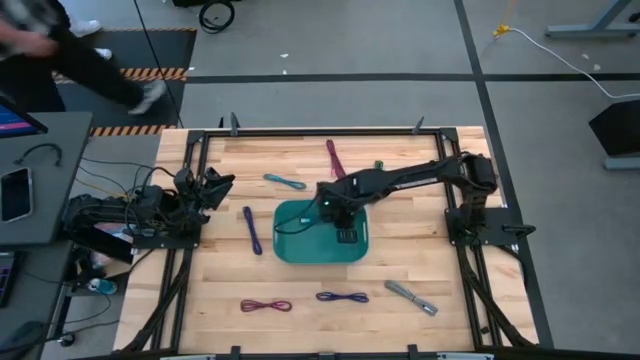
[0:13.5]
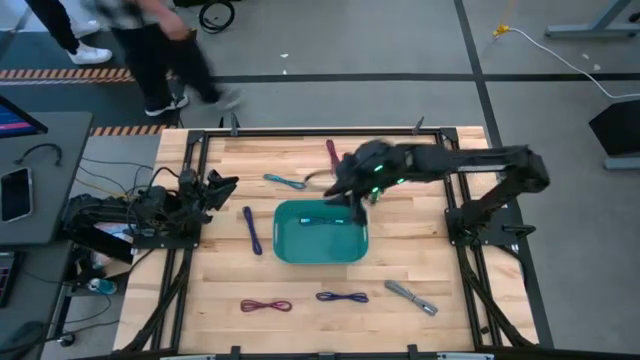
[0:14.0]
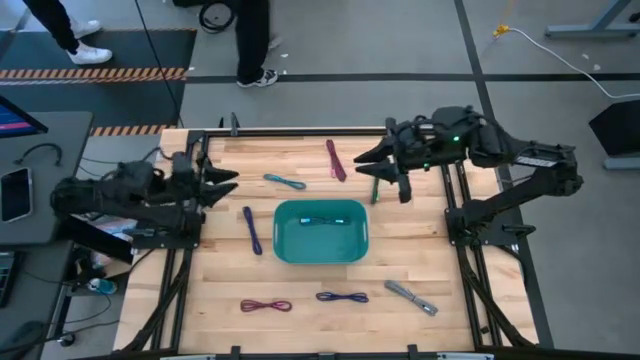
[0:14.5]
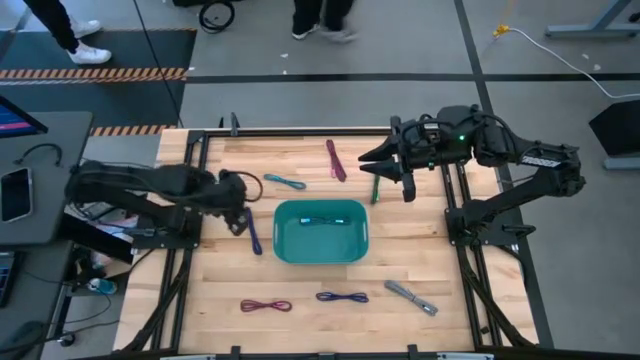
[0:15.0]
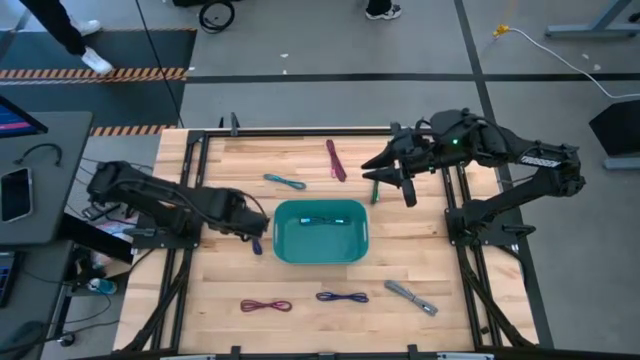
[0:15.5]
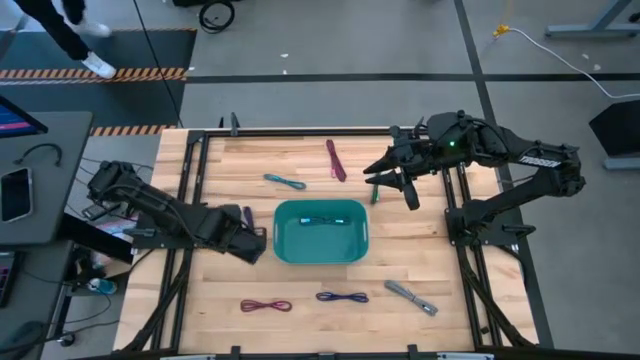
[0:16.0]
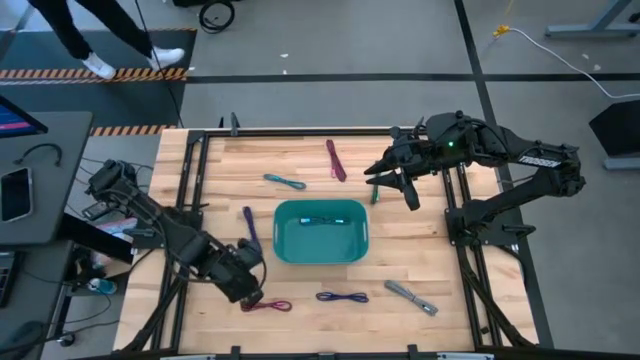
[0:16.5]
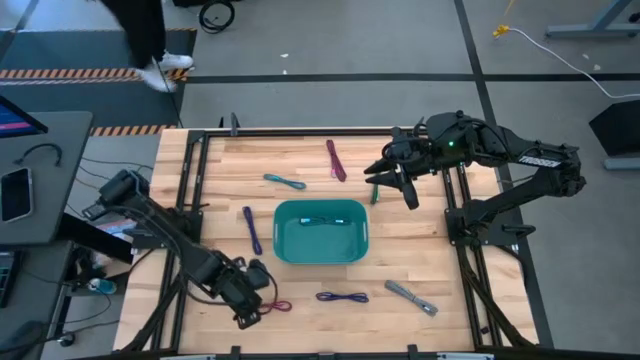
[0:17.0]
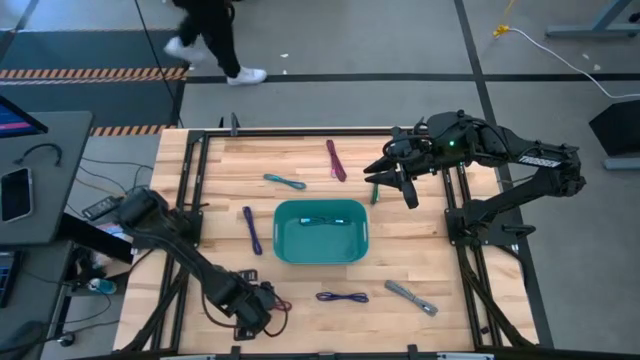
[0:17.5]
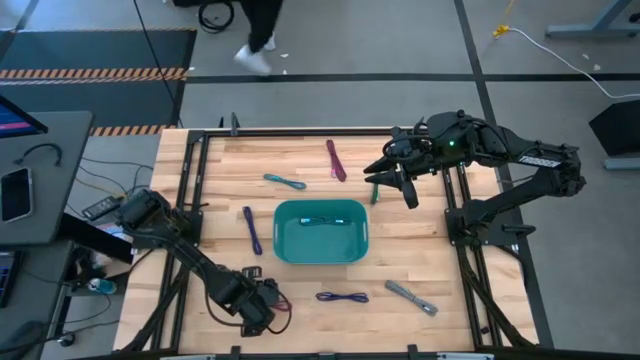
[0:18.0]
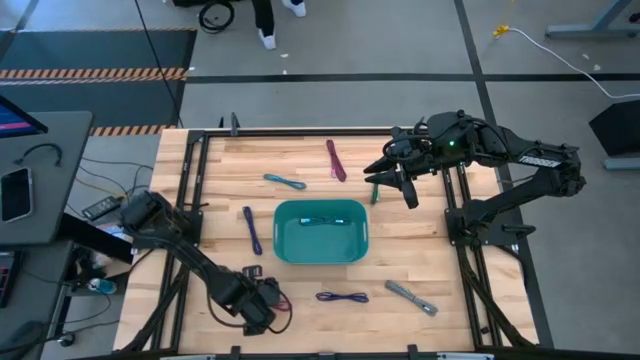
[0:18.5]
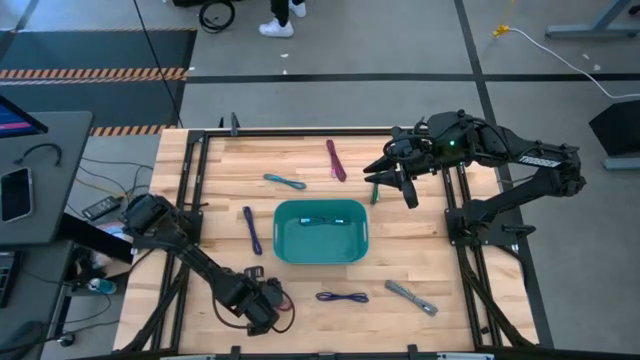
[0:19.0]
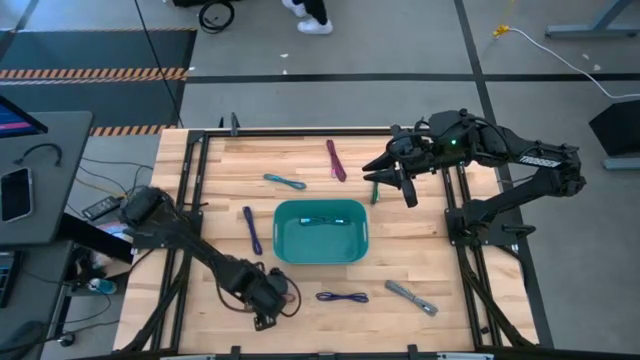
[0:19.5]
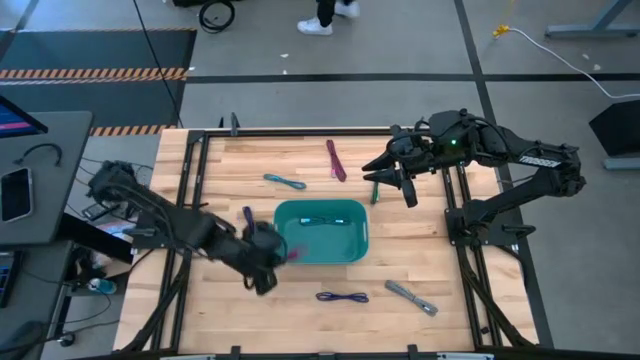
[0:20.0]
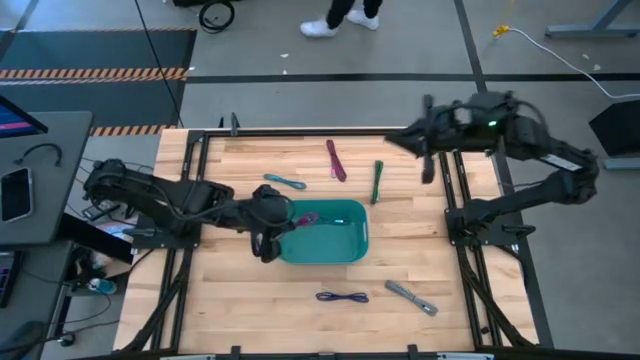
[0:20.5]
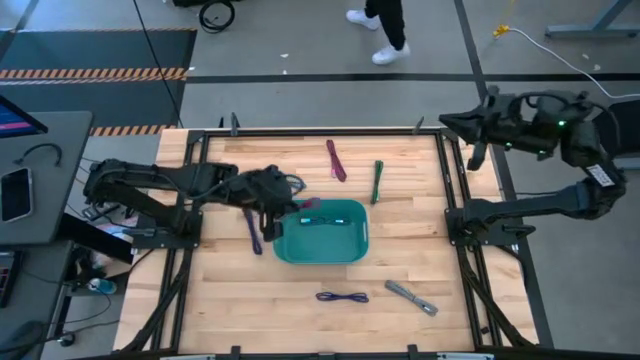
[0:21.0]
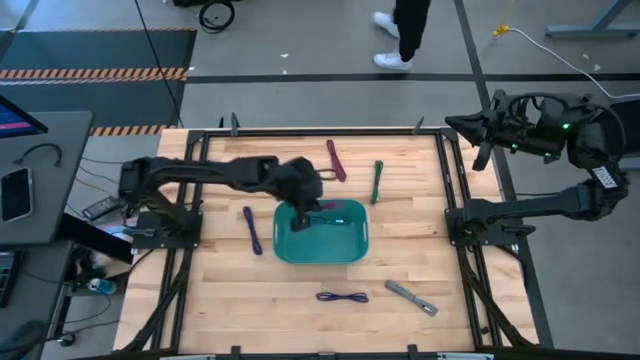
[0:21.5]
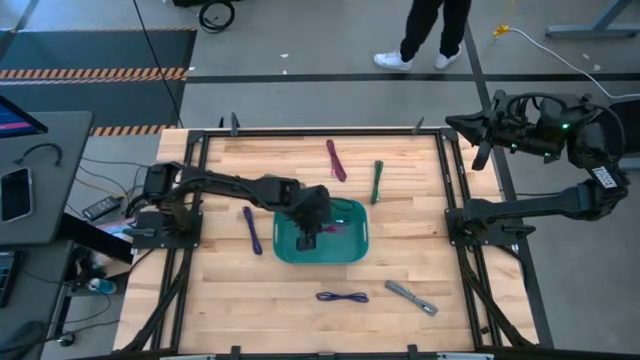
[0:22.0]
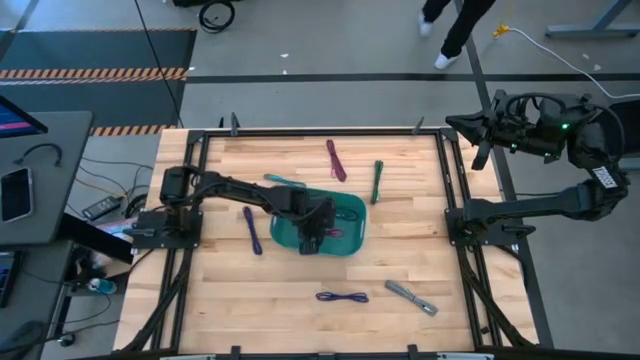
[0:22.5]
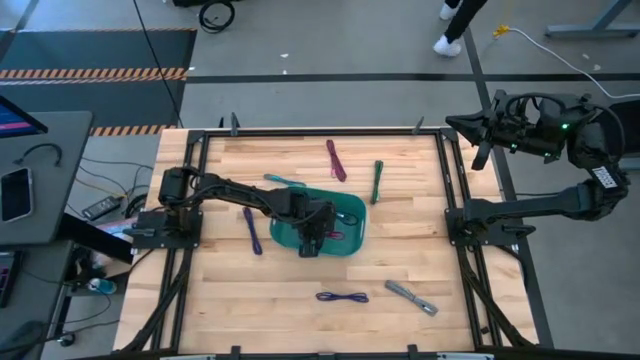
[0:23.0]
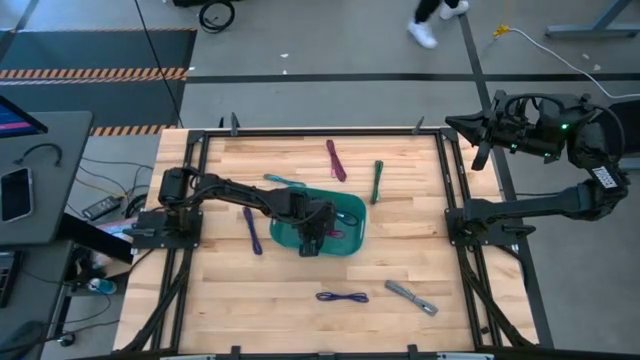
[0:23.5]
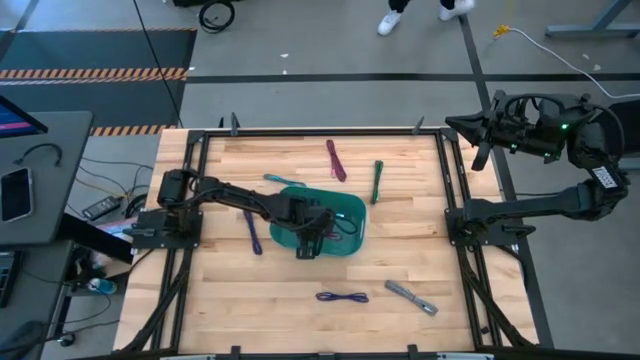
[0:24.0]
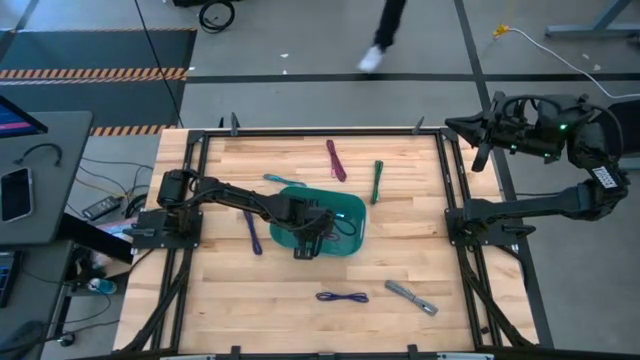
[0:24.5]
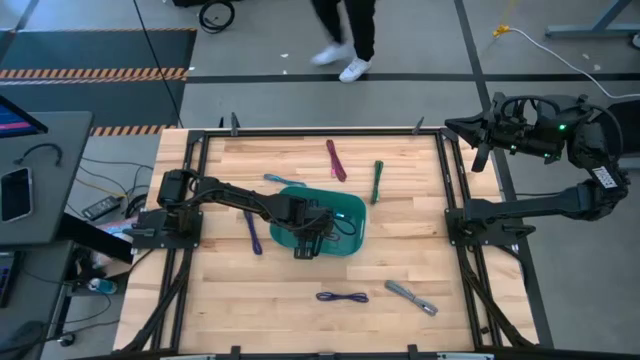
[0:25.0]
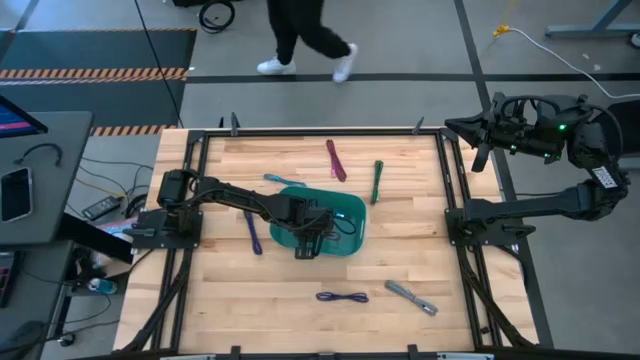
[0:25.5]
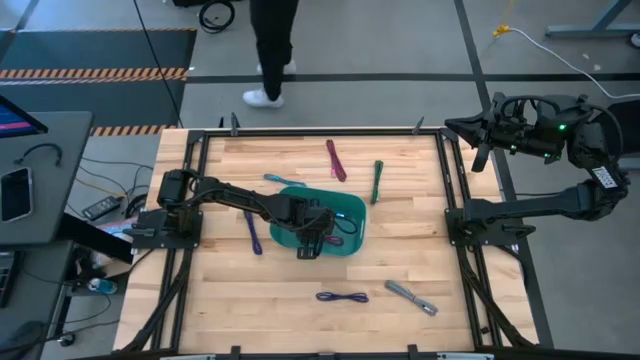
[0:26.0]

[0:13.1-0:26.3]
Task: Pick and place USB-C Cables
Put the bottom pink charger cable into the blue bin

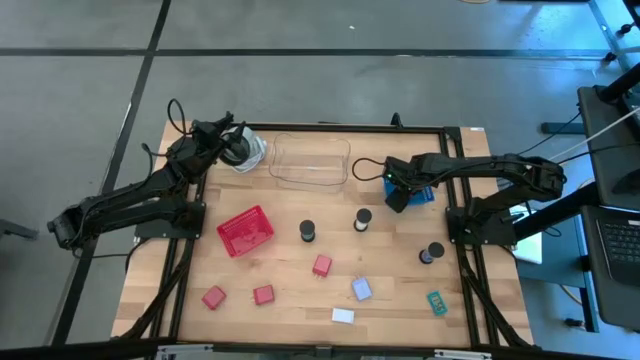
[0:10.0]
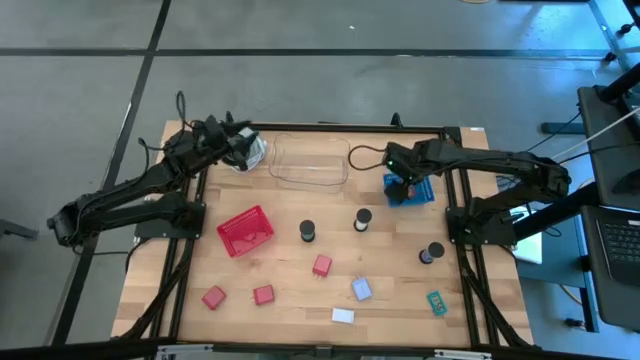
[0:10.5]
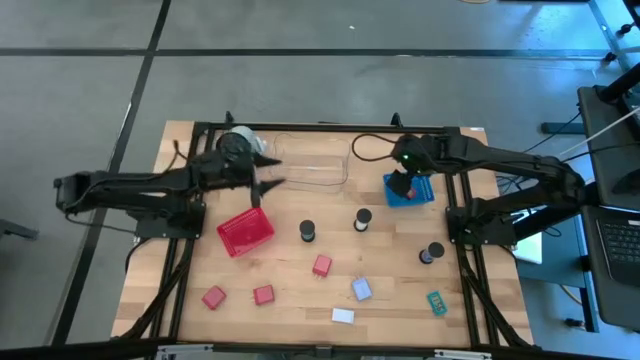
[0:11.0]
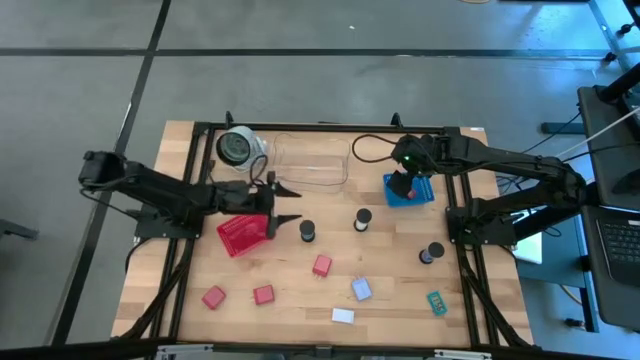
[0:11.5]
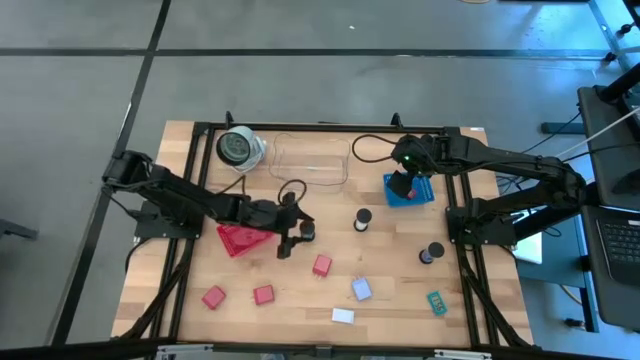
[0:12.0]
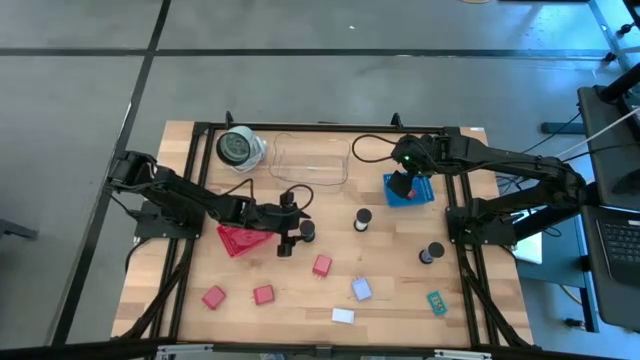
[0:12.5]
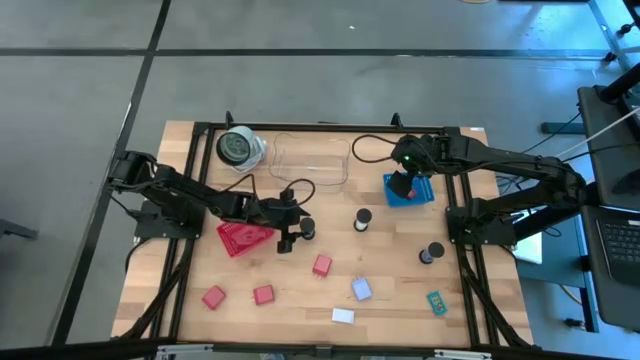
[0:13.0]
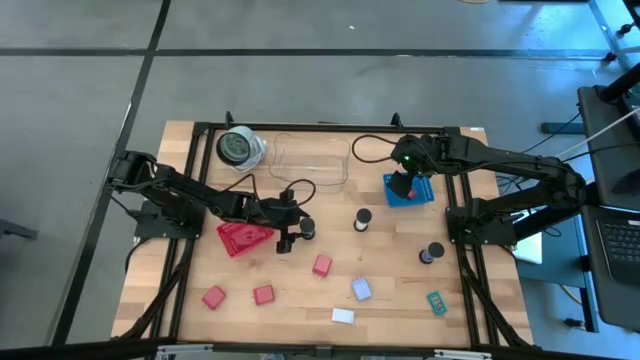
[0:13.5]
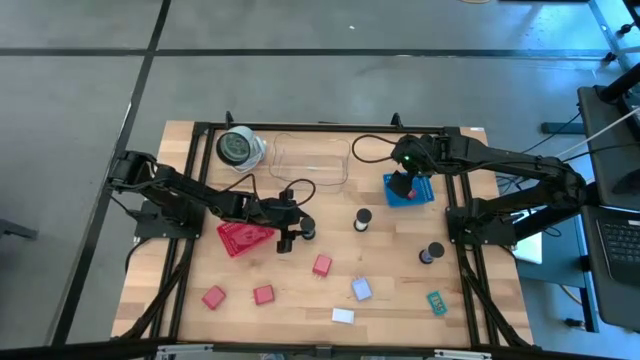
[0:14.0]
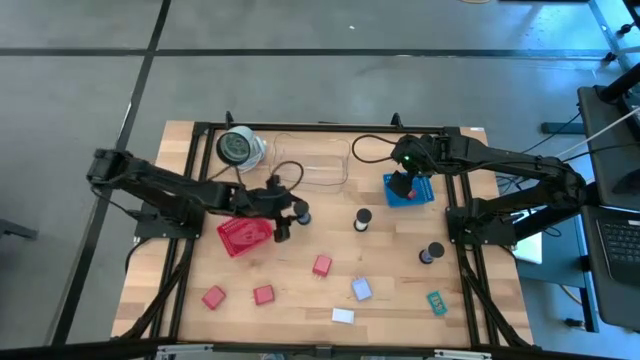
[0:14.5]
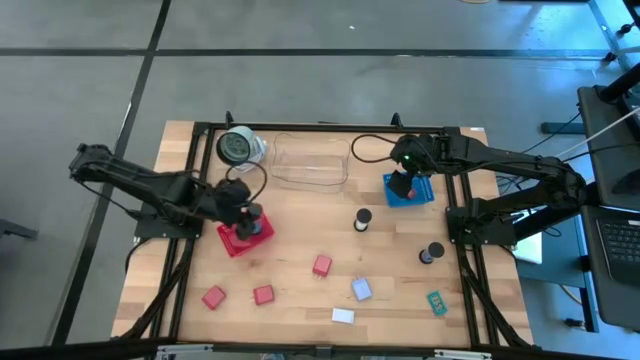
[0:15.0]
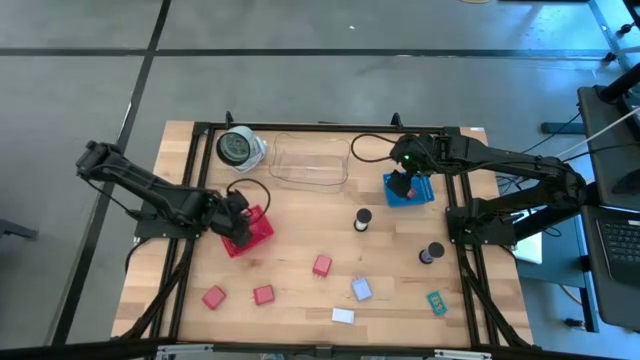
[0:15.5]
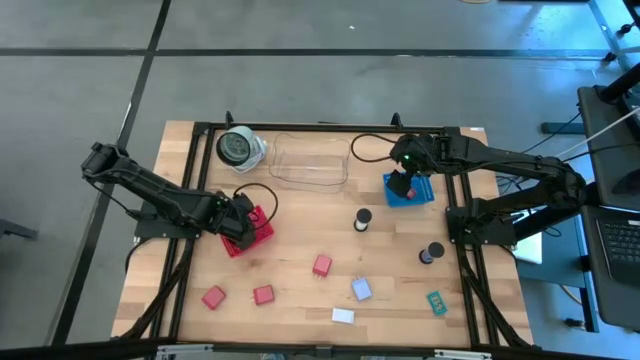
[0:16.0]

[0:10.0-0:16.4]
Task: Pick & Place Office items
Put the left blue hourglass into the red bin
